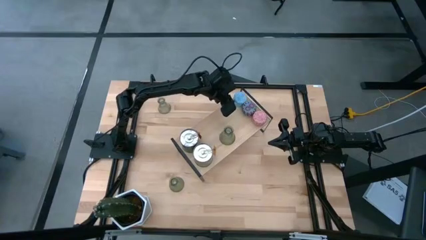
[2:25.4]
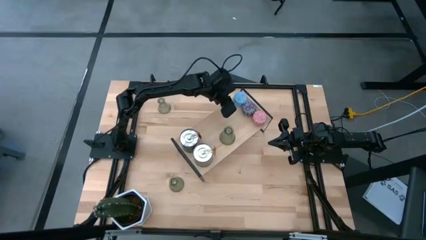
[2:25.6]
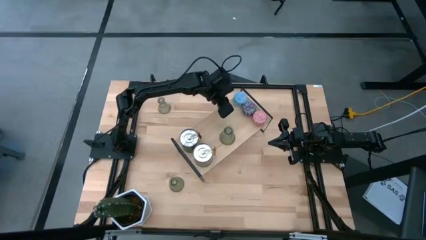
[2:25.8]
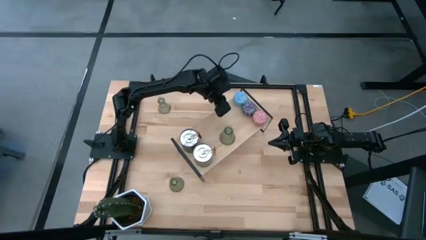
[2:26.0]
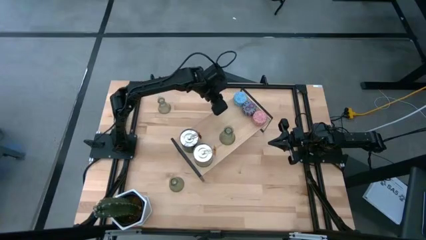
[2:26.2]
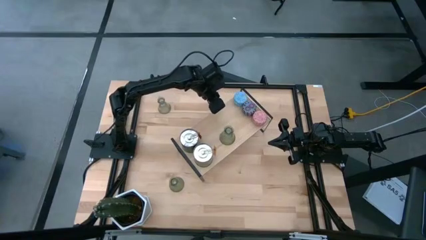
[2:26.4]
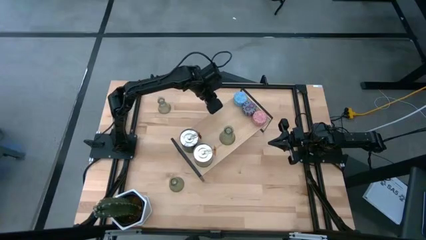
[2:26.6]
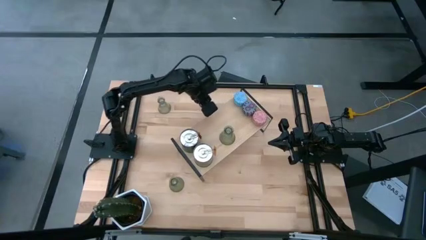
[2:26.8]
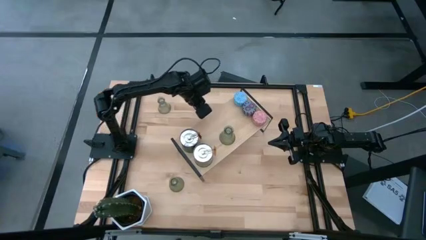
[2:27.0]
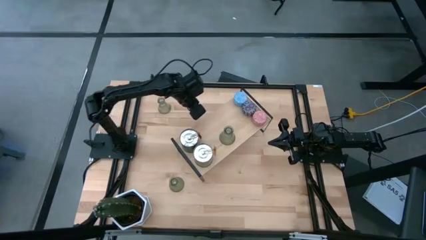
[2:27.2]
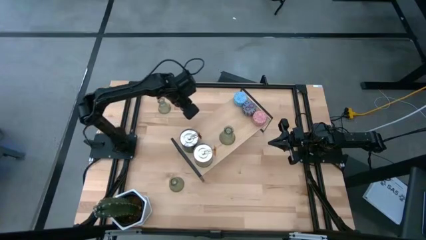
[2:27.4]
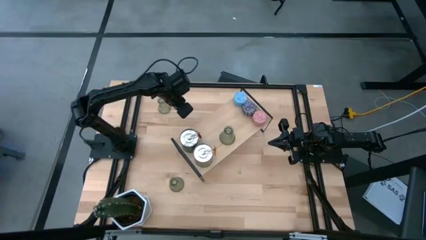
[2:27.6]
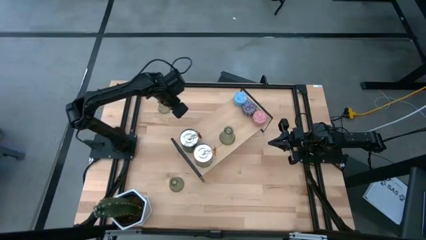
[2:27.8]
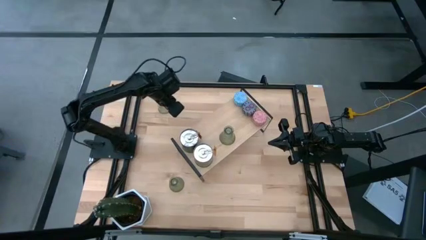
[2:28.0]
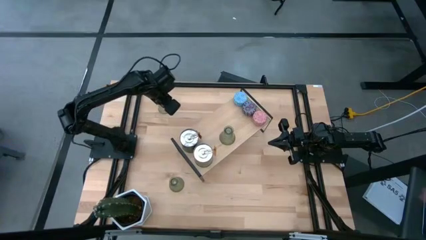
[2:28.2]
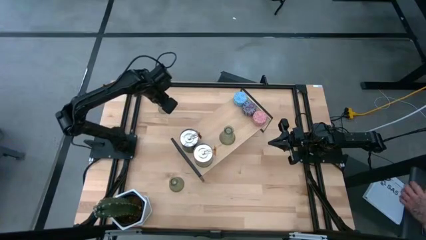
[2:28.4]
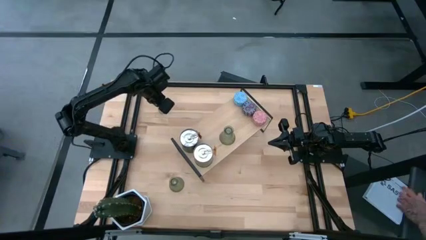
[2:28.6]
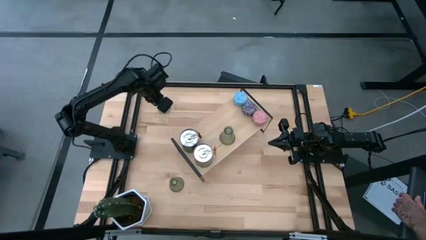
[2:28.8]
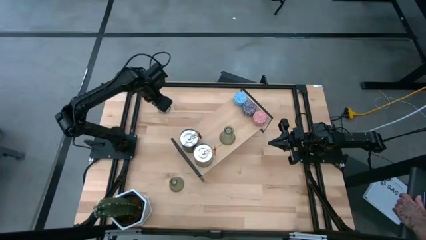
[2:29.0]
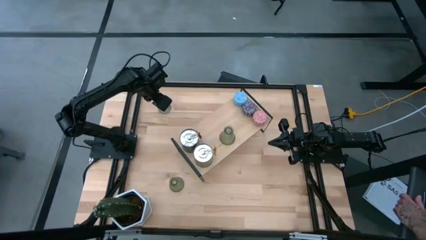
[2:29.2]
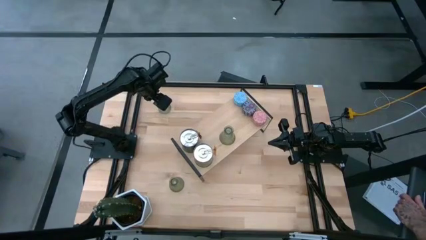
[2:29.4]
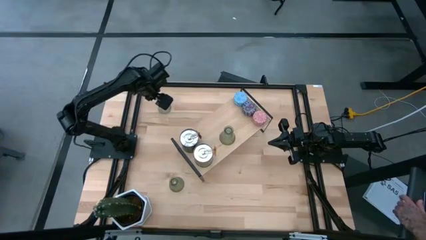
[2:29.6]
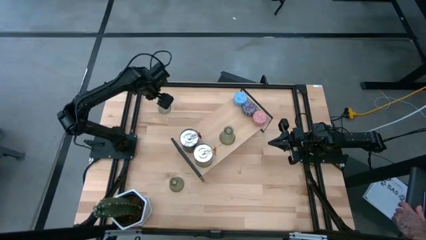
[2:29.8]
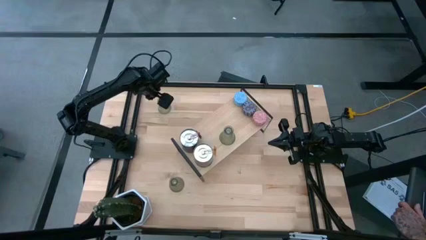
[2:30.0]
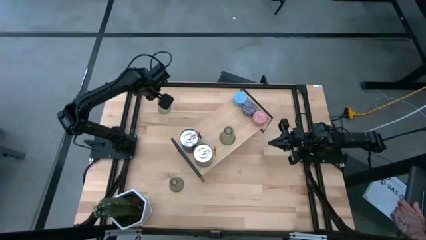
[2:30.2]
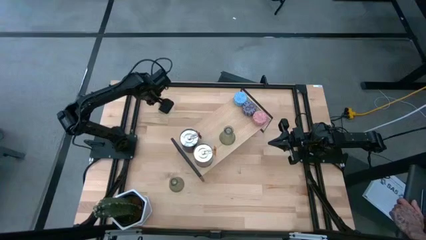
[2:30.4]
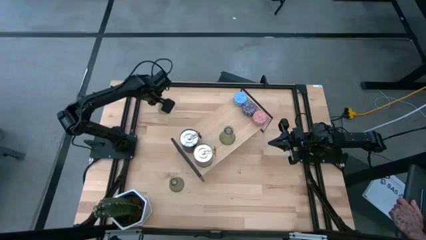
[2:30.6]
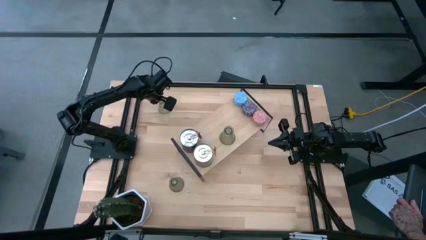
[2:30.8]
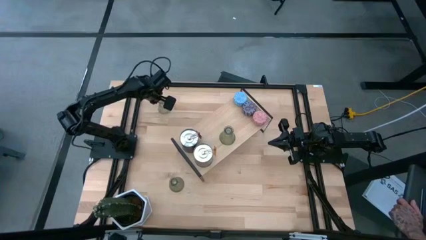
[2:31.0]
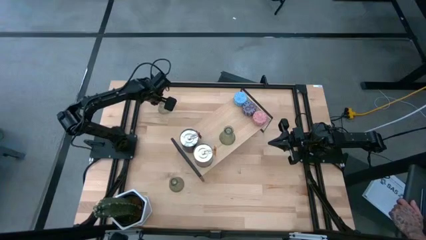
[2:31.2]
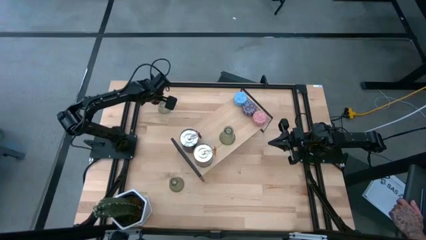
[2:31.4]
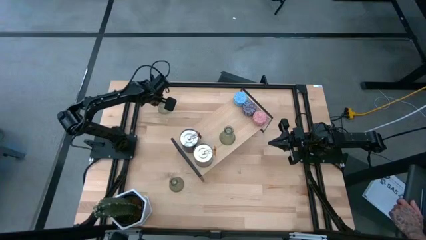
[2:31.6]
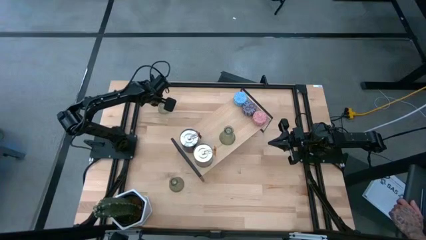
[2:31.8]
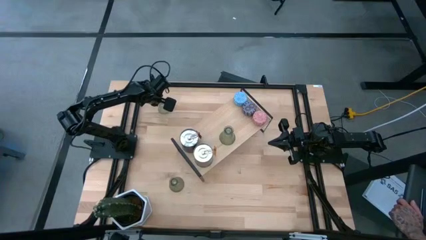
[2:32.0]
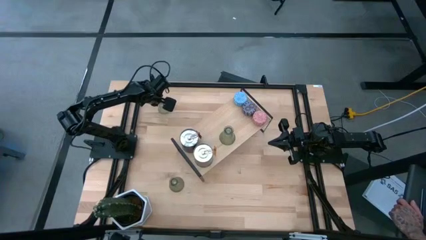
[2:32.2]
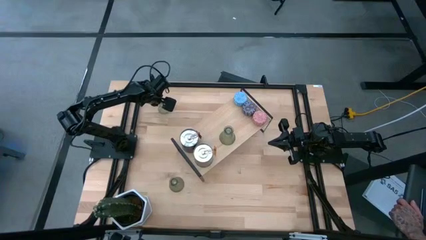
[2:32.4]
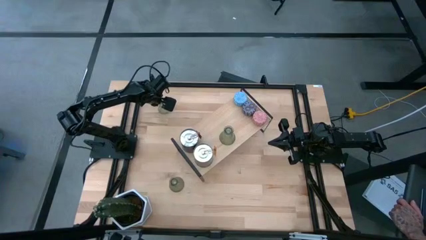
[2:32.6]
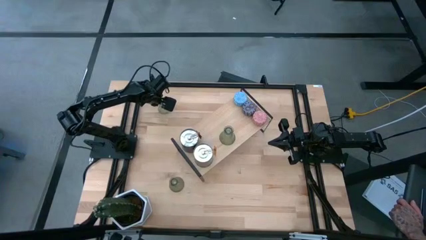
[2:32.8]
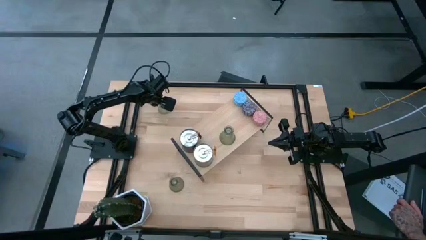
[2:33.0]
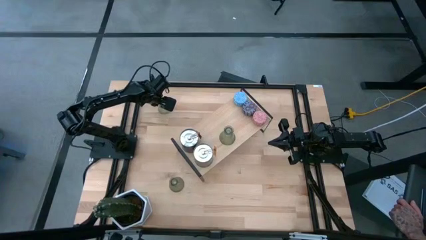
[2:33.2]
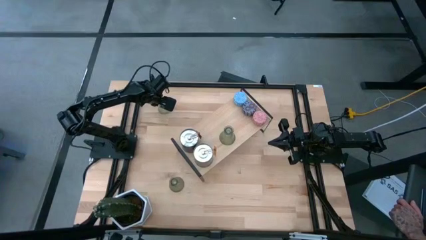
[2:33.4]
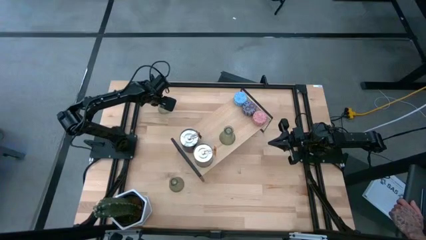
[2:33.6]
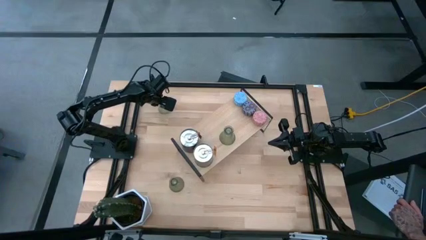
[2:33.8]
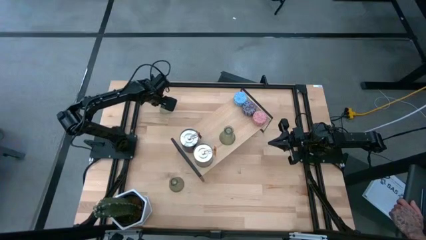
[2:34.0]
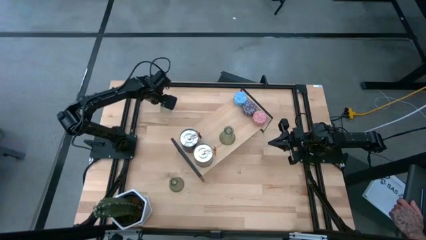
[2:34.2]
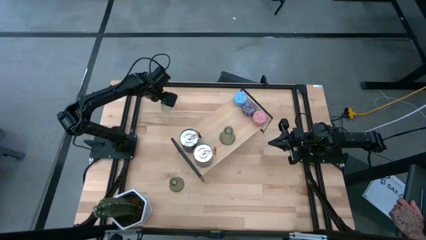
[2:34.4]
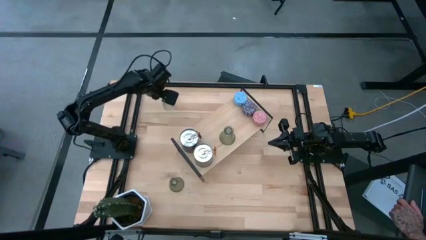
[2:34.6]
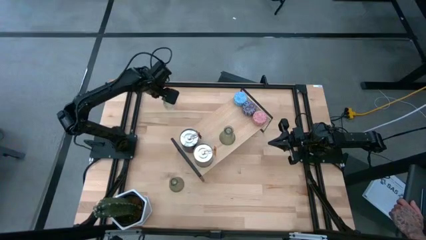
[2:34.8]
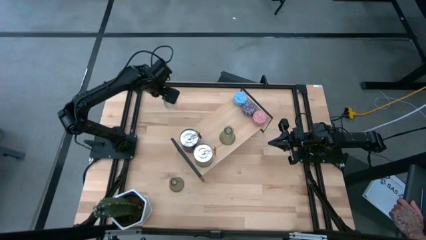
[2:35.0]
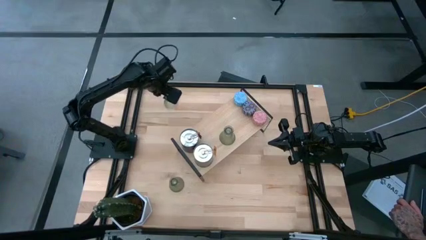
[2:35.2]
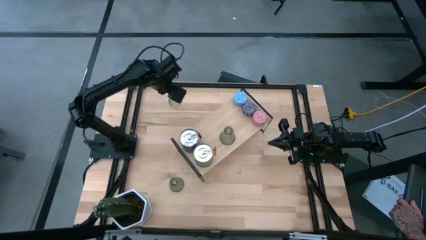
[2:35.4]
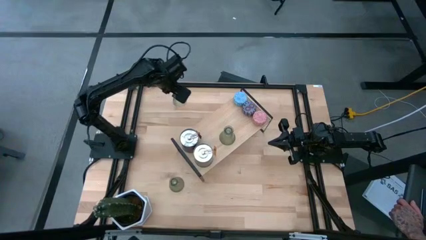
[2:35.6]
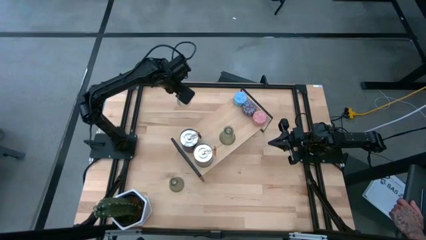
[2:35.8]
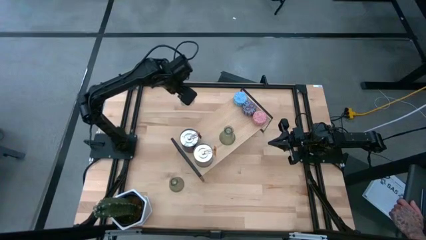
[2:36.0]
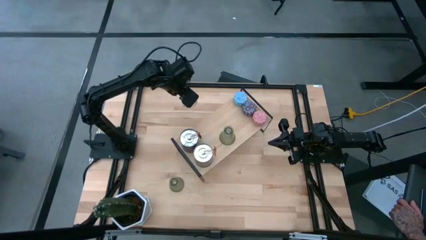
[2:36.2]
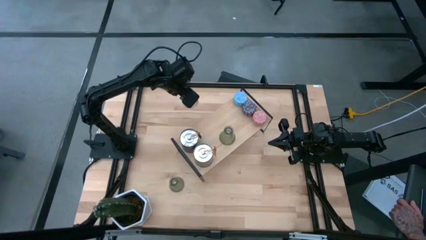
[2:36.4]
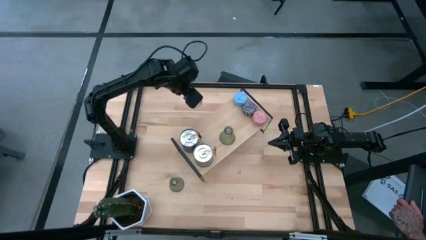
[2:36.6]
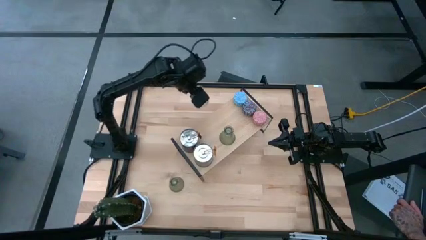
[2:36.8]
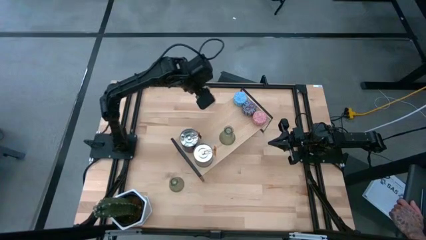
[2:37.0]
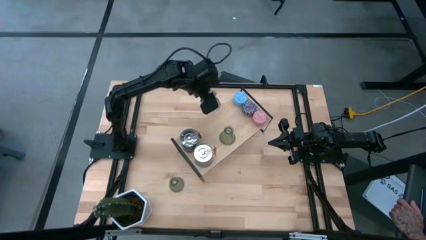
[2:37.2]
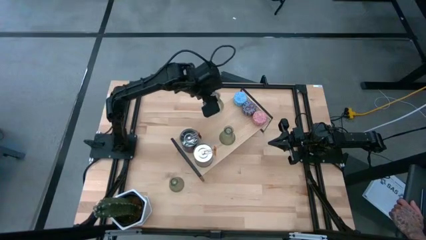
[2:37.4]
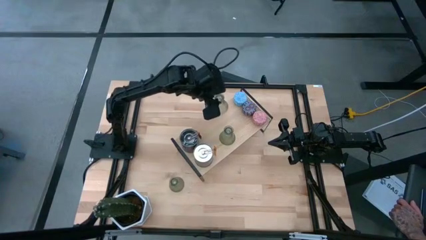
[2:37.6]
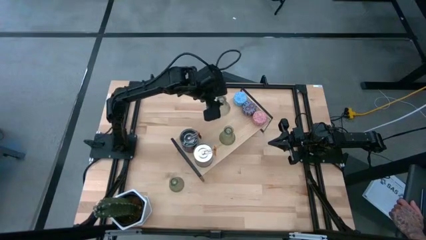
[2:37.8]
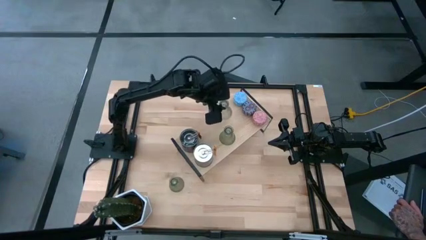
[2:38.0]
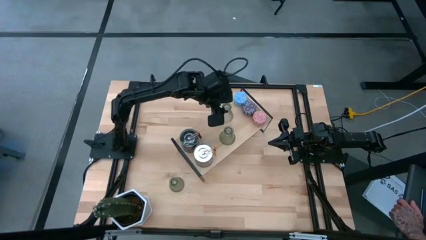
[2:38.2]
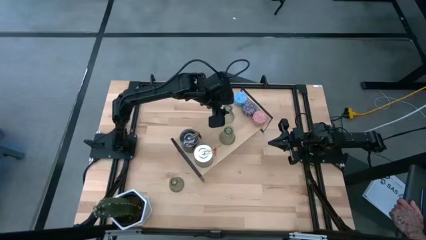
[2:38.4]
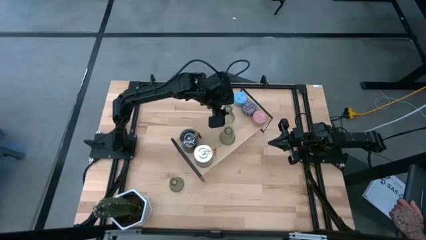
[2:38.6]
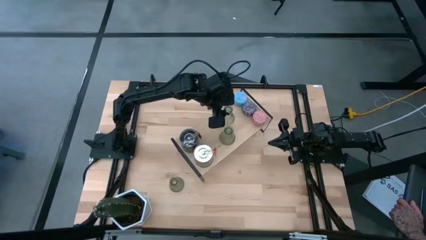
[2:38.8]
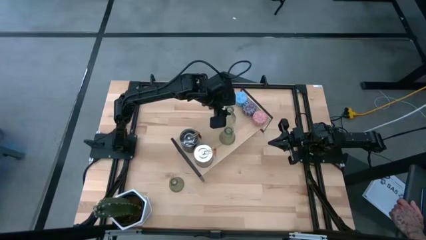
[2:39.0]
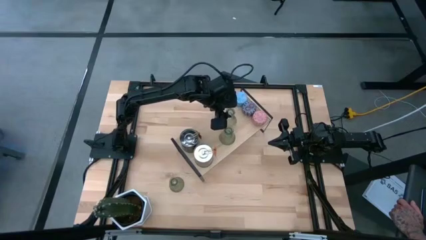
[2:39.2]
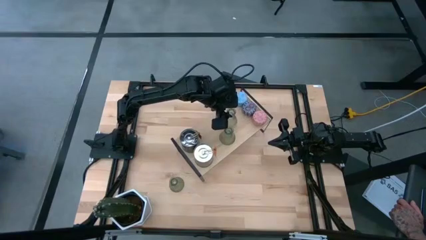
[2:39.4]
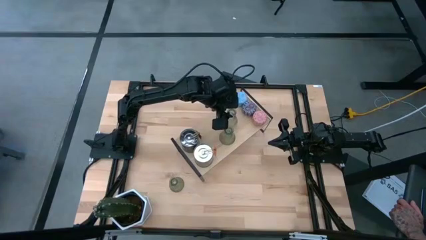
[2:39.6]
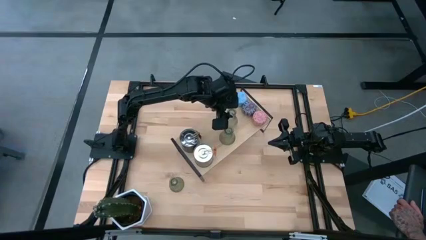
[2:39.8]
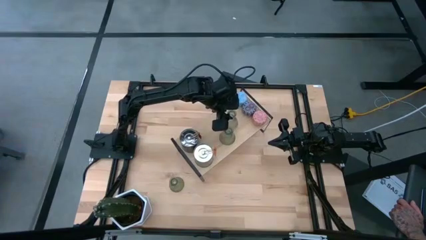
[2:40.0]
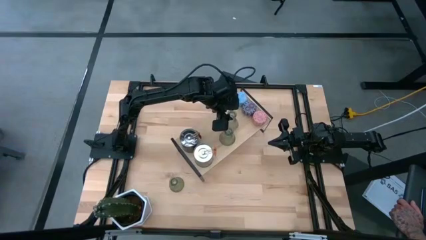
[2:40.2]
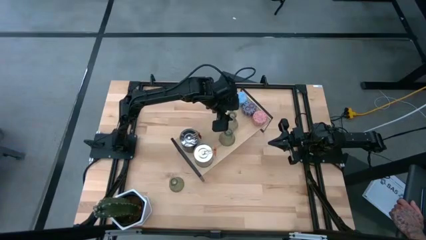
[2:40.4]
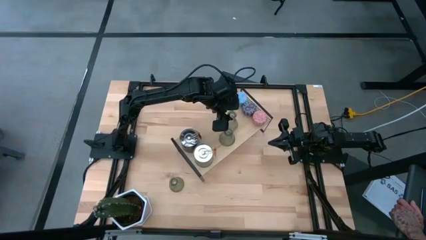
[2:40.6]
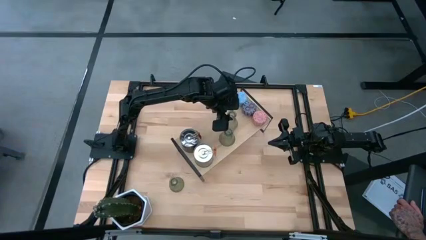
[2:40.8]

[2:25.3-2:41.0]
Task: Pick & Place candle stick holders
Put the top transparent candle holder on the shelf

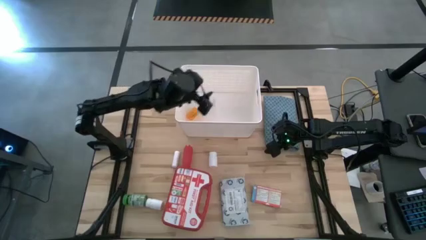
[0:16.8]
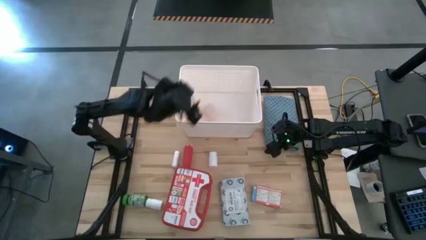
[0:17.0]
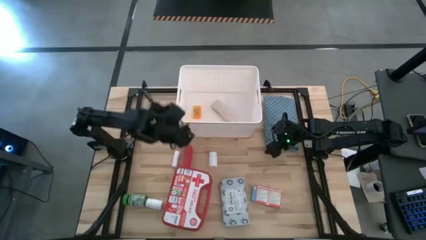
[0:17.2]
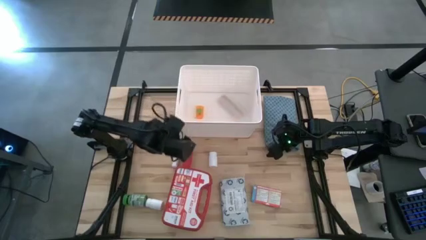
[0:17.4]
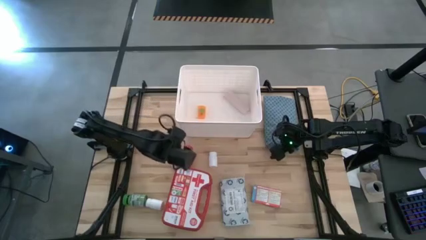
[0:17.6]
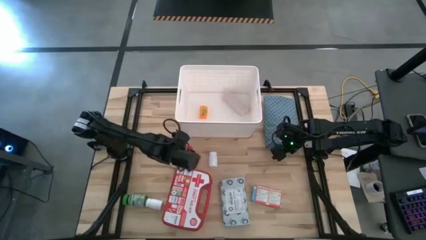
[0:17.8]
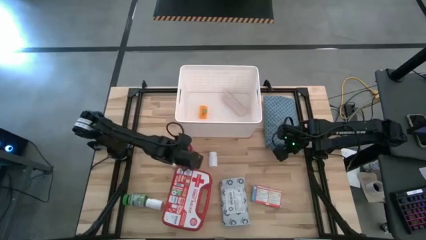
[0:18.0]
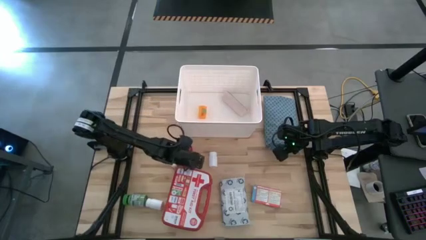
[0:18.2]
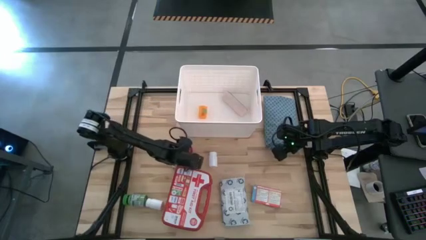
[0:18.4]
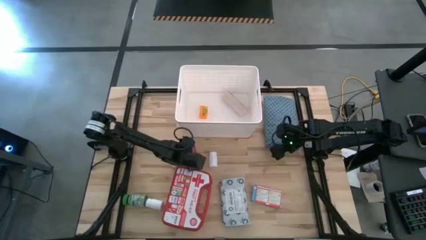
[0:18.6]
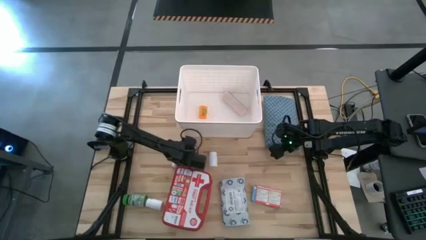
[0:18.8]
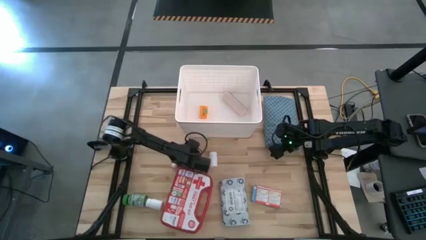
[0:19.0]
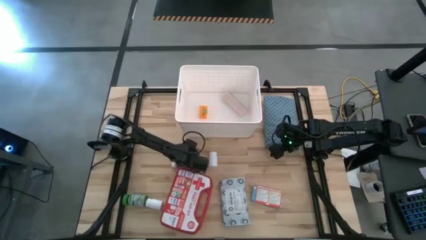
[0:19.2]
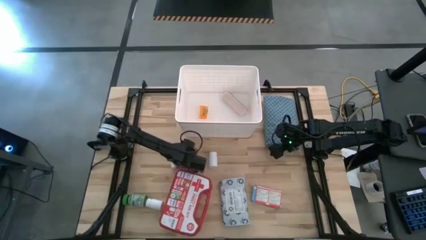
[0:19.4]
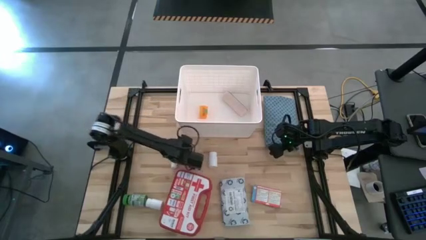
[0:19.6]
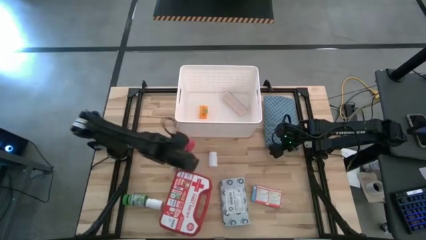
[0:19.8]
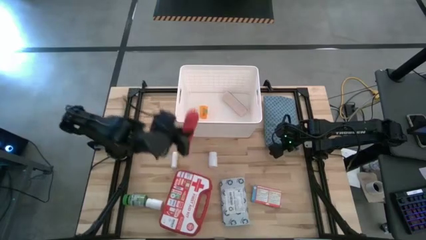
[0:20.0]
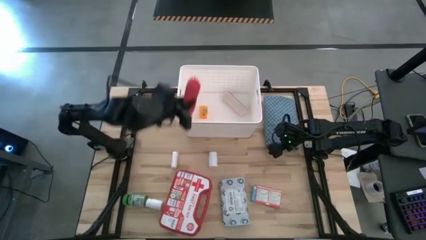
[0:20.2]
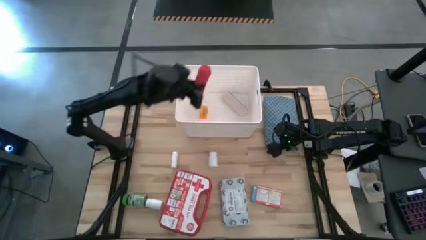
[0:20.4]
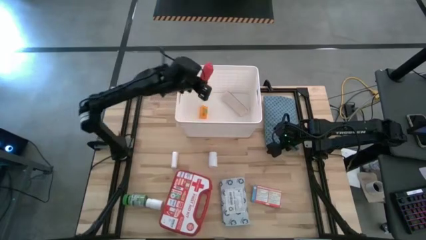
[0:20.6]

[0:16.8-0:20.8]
Task: Pick & place medical supplies in basket/bin
Put the red bandage into the white bin
